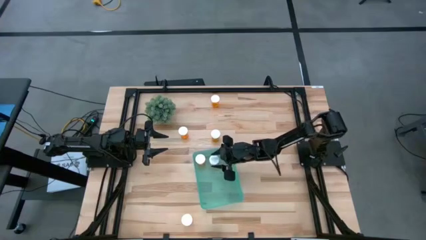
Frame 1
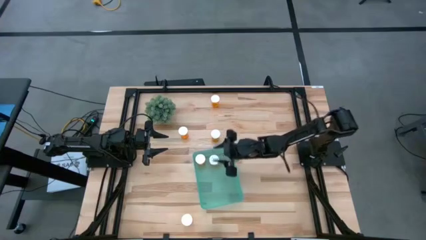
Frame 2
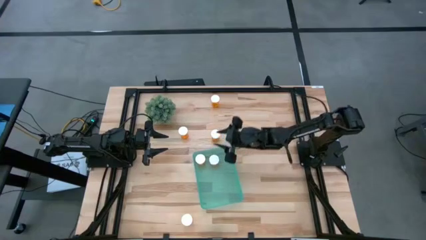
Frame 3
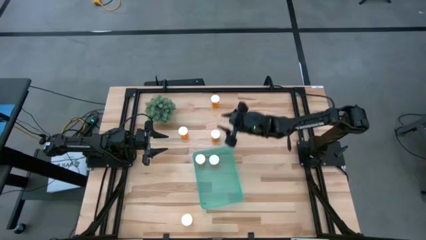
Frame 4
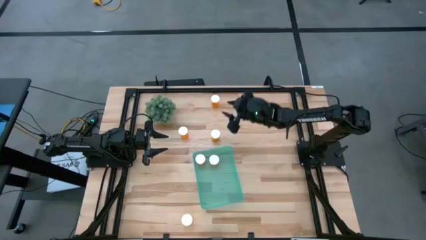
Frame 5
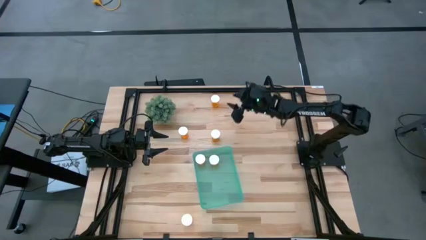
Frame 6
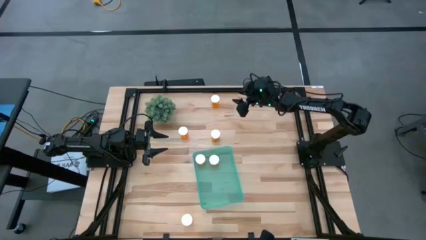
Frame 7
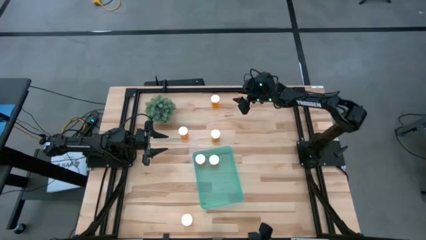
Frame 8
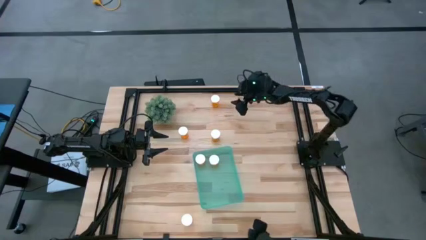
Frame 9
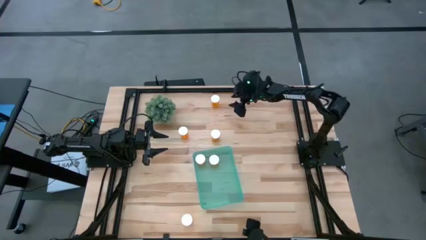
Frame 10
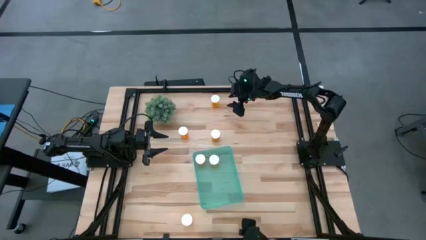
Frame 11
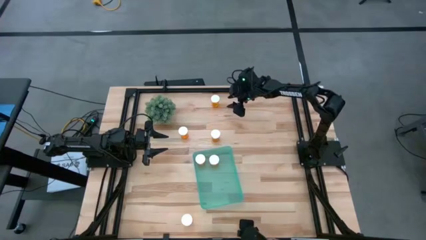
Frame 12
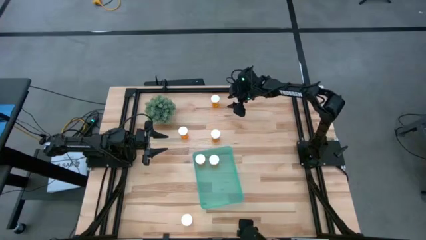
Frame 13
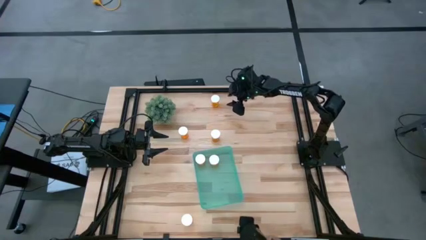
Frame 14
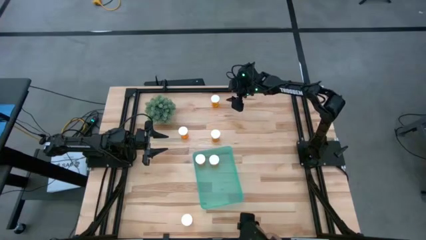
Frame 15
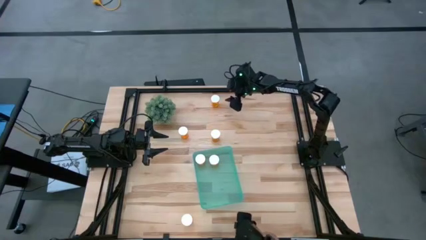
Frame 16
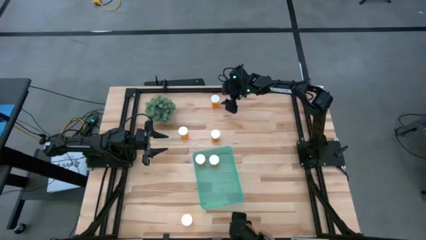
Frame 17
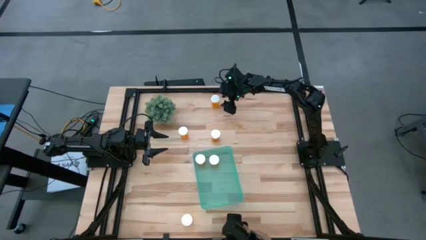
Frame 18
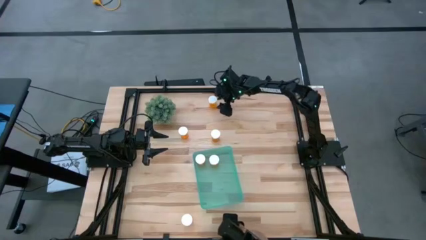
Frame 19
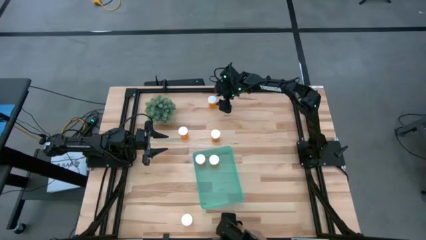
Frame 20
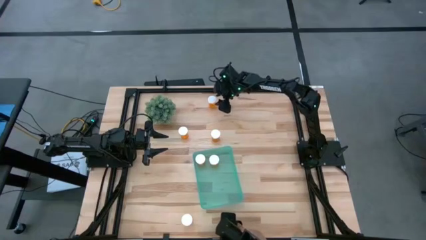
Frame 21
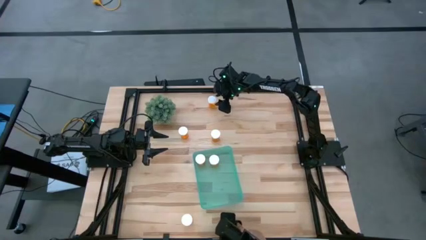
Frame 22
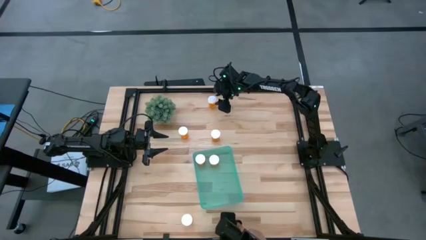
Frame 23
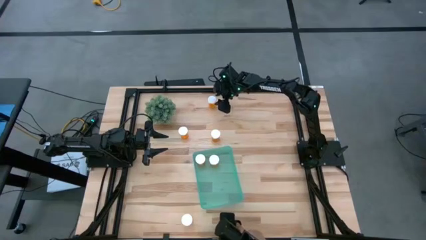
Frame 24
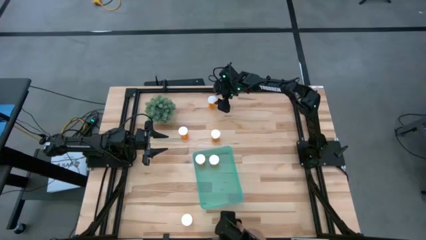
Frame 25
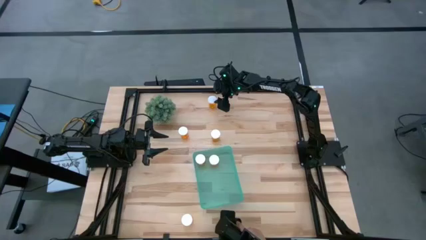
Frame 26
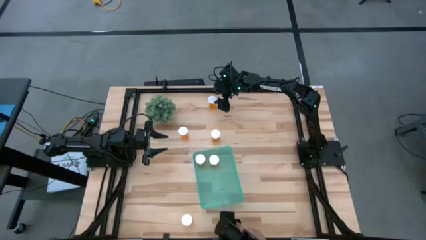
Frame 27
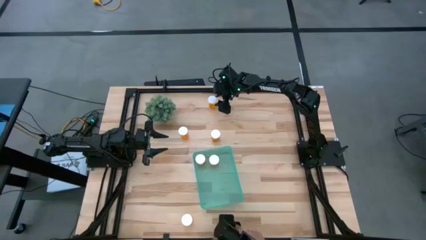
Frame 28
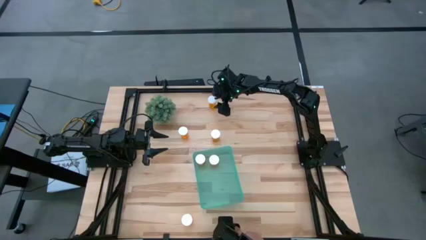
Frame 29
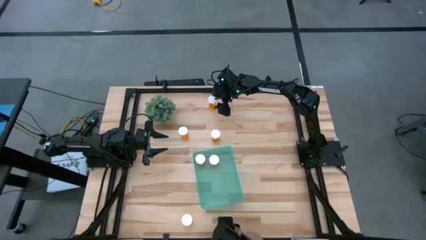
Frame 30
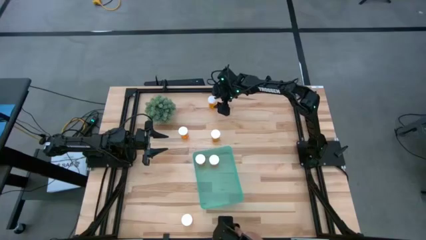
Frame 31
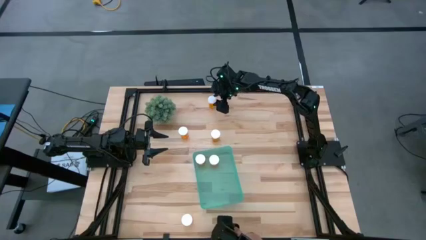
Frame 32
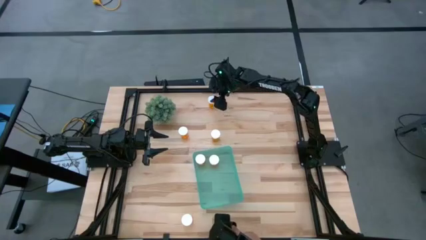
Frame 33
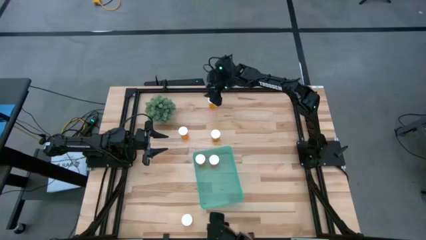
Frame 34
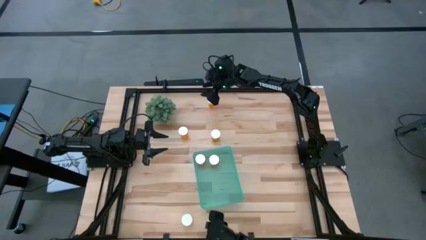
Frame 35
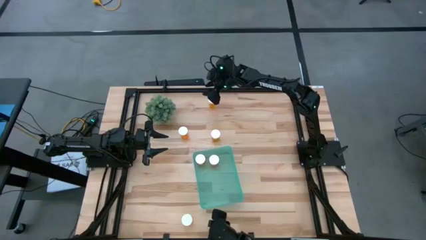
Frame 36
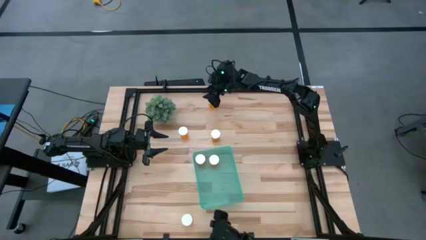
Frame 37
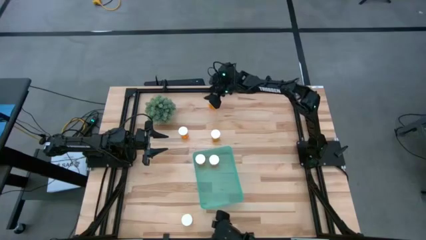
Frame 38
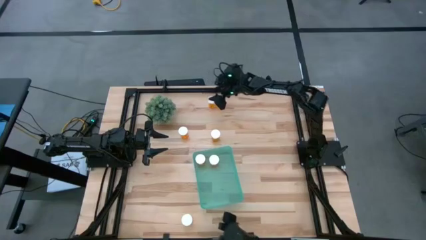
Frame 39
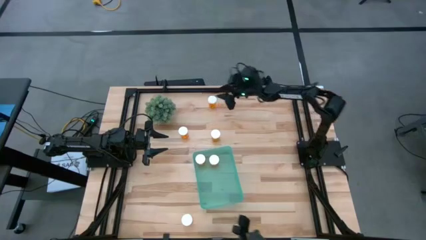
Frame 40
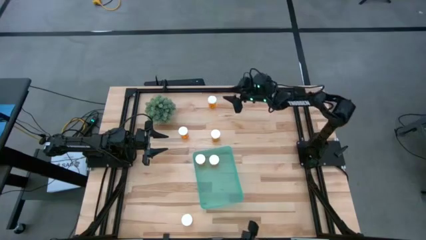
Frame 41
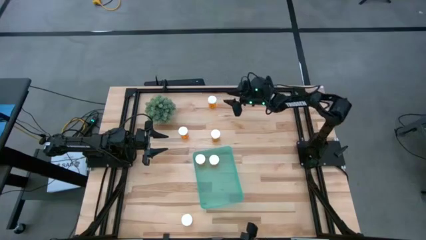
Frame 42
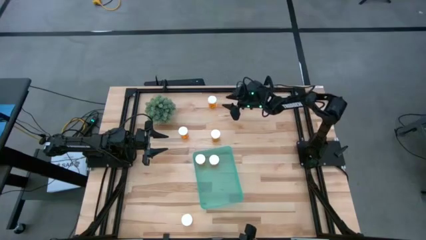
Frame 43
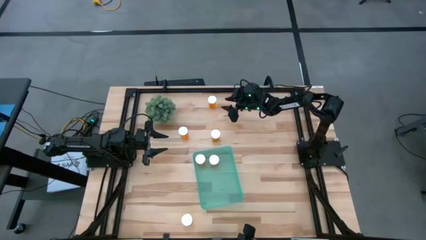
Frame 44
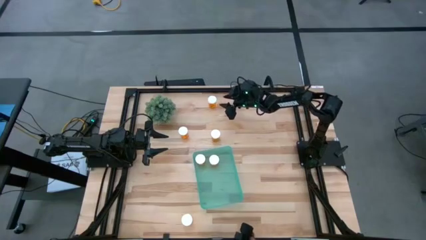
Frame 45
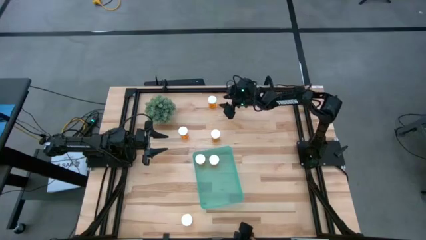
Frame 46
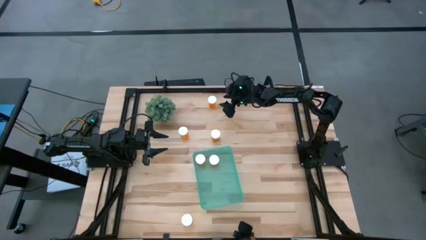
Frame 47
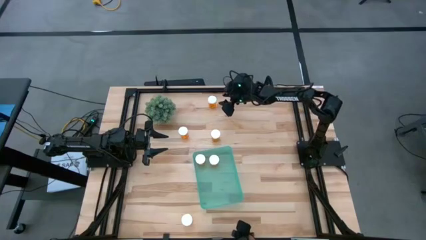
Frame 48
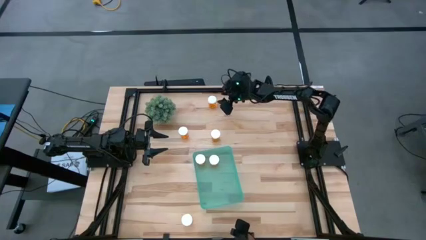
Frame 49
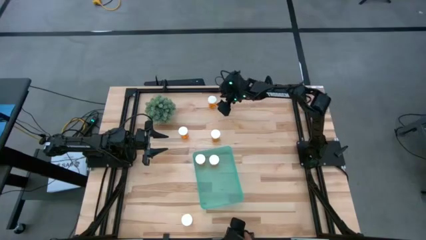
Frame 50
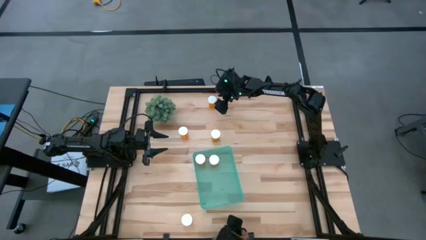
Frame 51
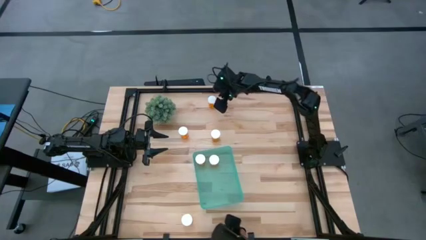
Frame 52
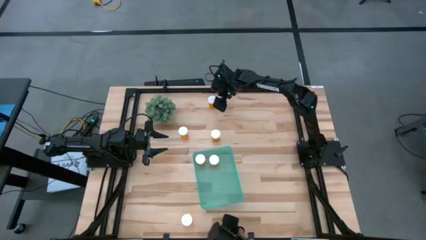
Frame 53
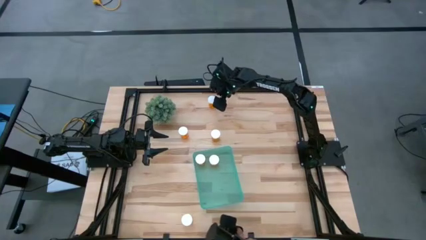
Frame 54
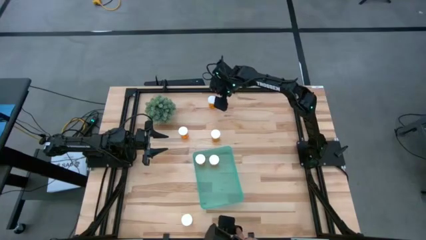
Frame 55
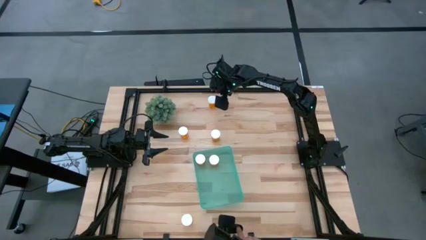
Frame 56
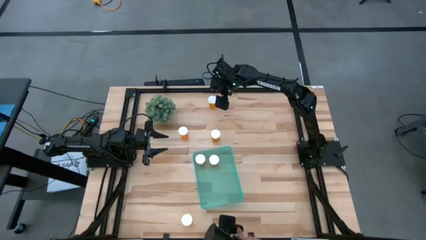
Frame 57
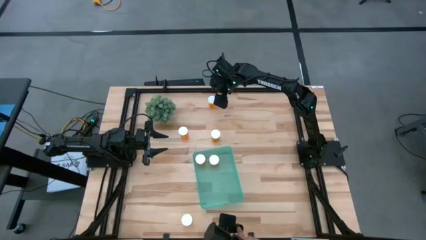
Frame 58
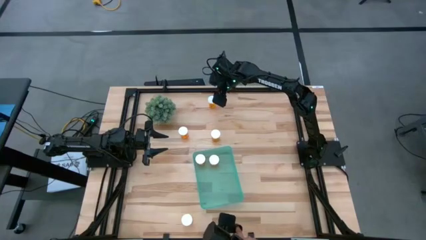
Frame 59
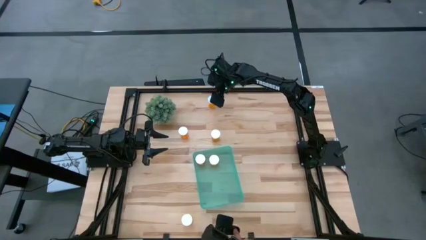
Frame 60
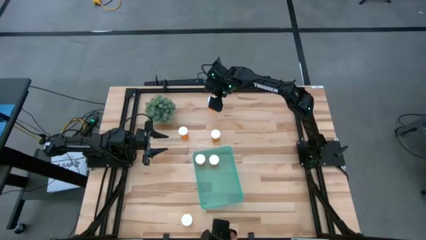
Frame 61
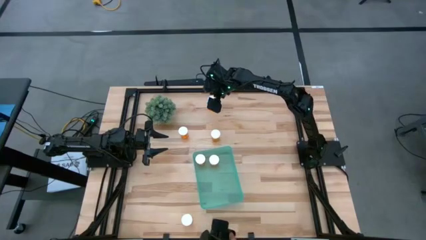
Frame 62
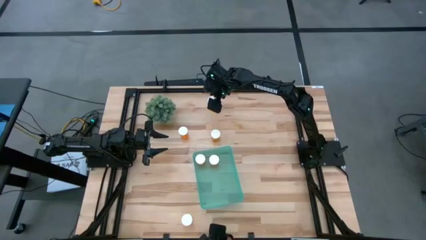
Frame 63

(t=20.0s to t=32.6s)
Task: Pick and place pill bottles into a basket
Put the orange pill bottle into the green bin
